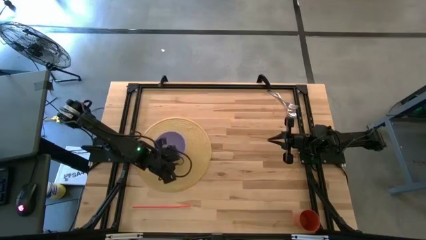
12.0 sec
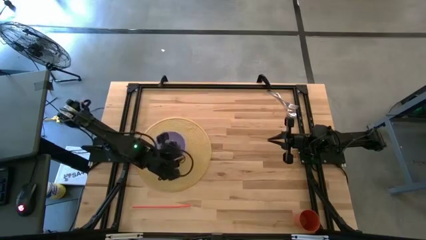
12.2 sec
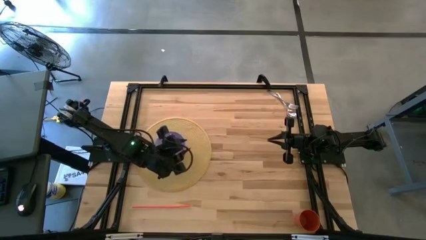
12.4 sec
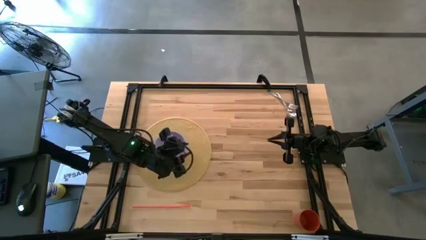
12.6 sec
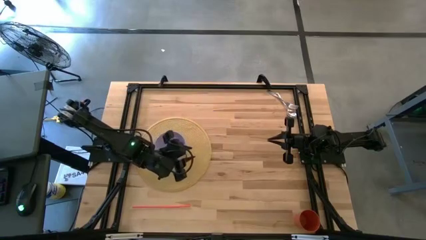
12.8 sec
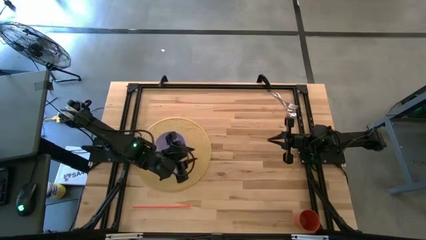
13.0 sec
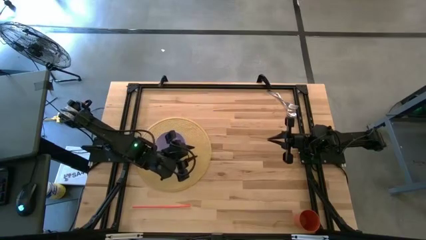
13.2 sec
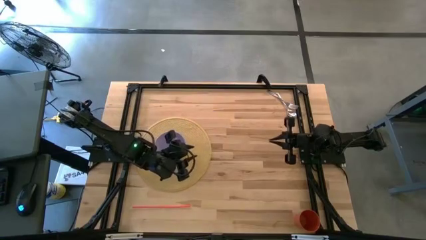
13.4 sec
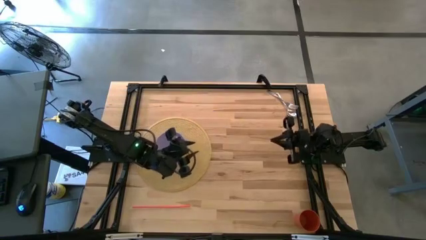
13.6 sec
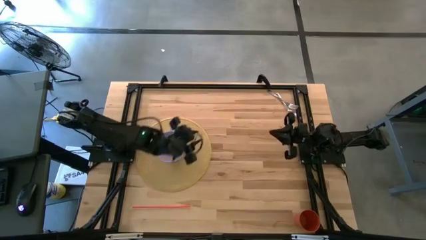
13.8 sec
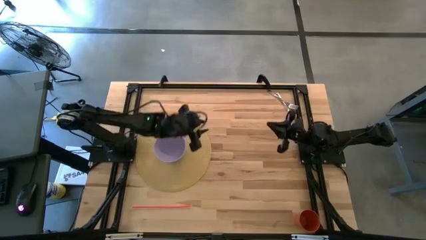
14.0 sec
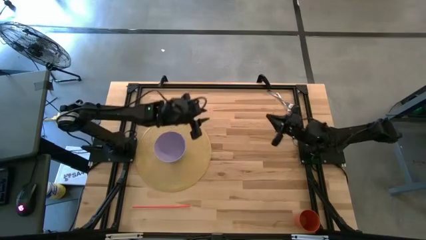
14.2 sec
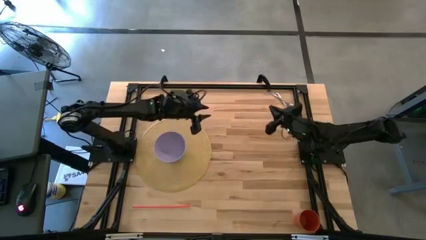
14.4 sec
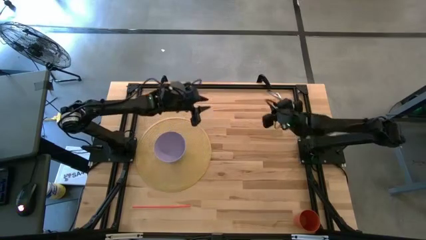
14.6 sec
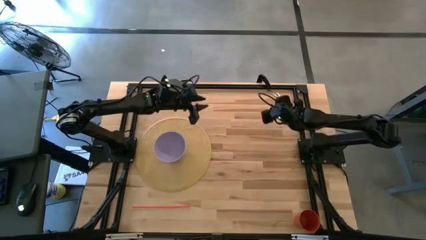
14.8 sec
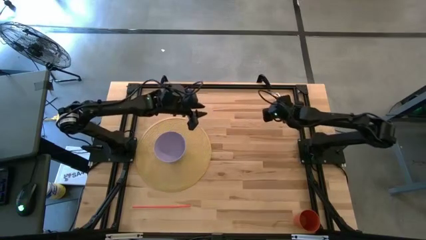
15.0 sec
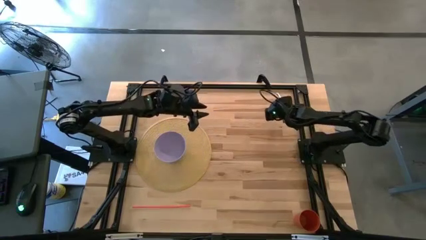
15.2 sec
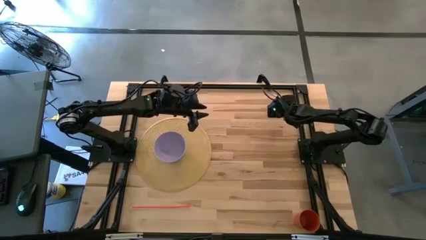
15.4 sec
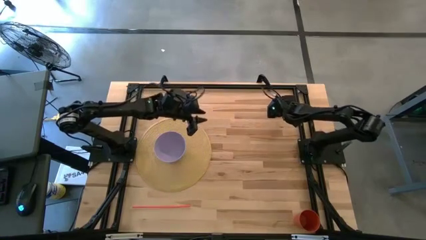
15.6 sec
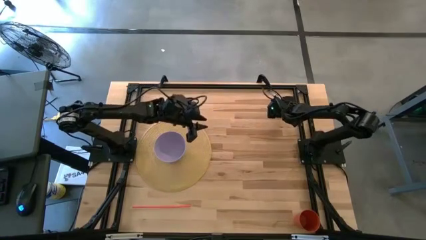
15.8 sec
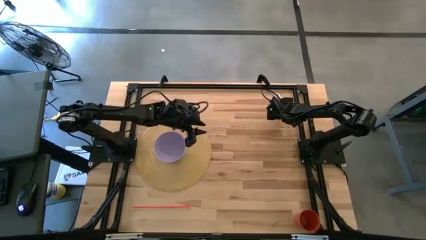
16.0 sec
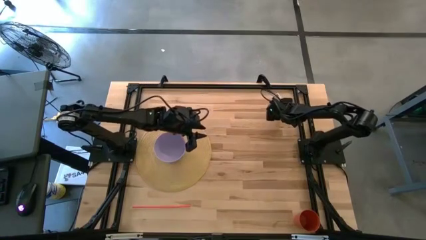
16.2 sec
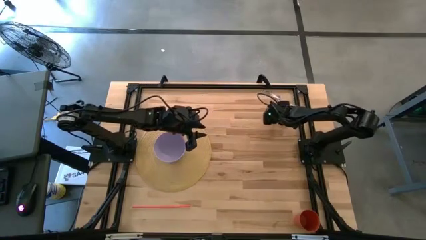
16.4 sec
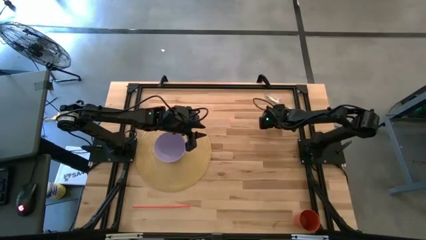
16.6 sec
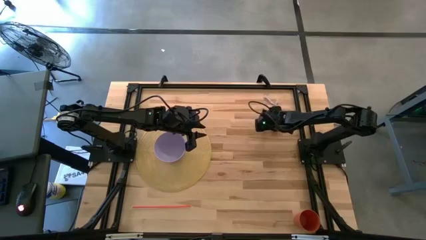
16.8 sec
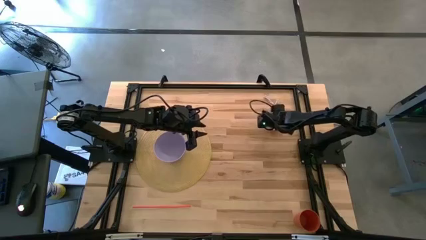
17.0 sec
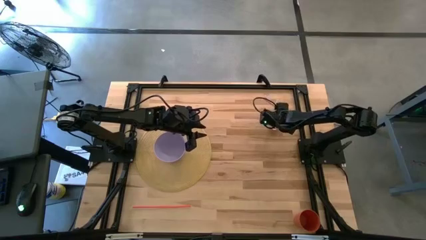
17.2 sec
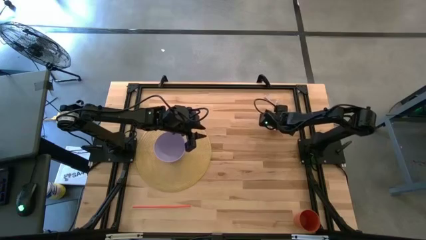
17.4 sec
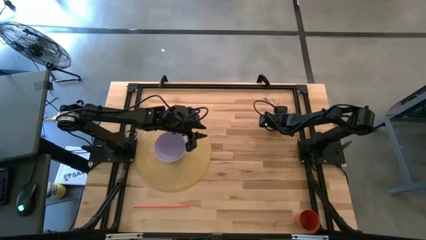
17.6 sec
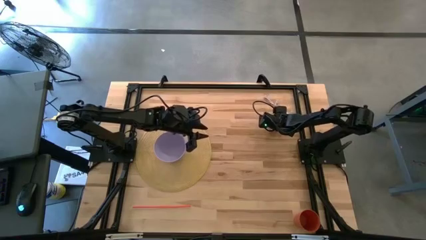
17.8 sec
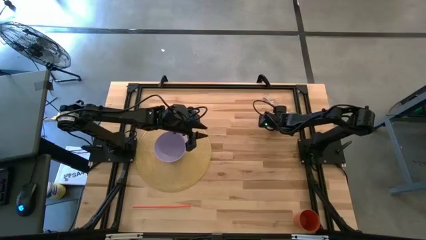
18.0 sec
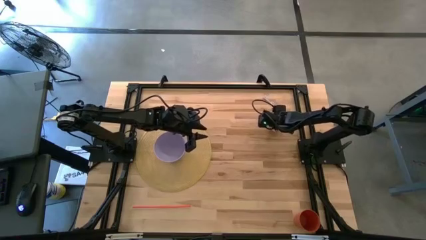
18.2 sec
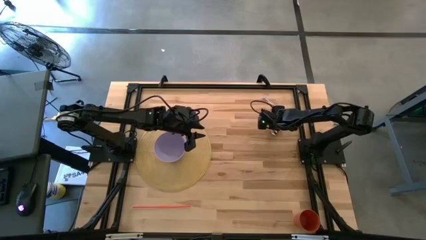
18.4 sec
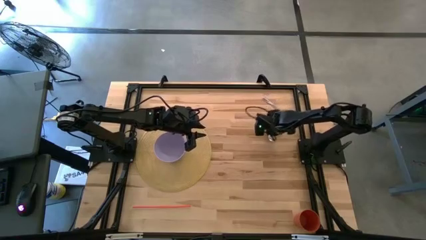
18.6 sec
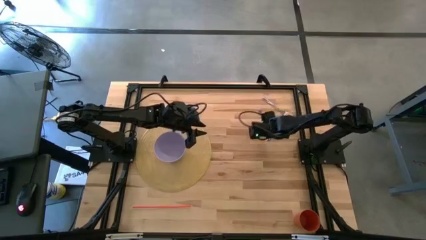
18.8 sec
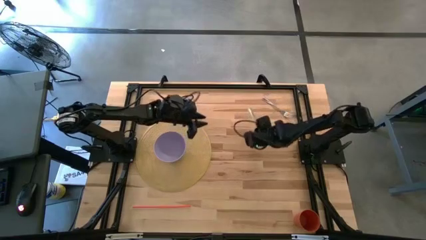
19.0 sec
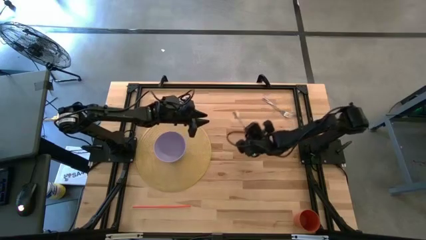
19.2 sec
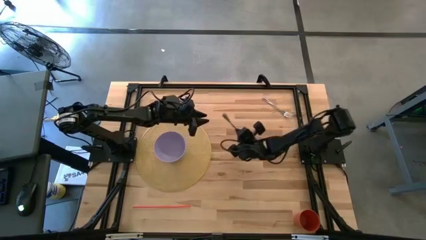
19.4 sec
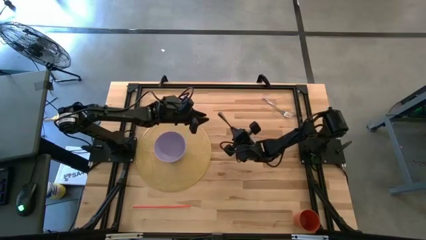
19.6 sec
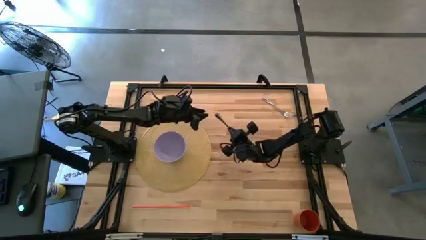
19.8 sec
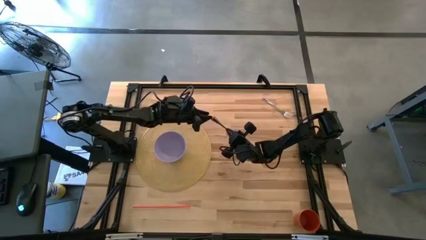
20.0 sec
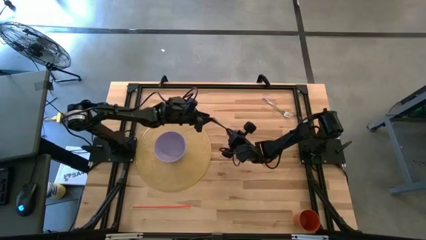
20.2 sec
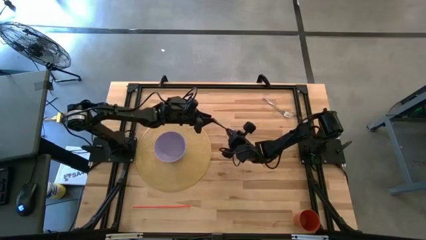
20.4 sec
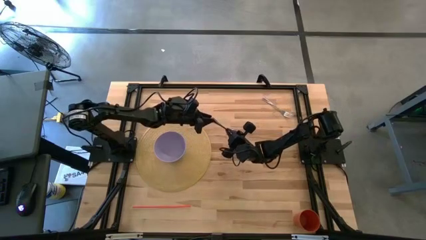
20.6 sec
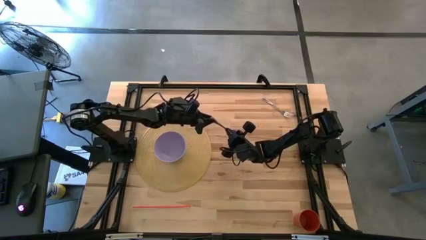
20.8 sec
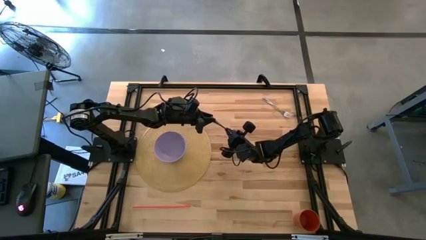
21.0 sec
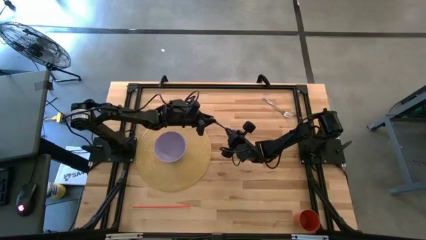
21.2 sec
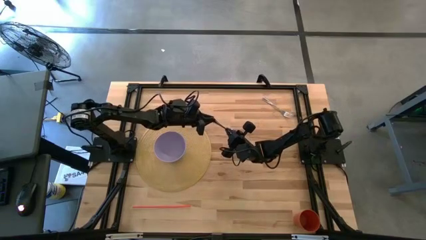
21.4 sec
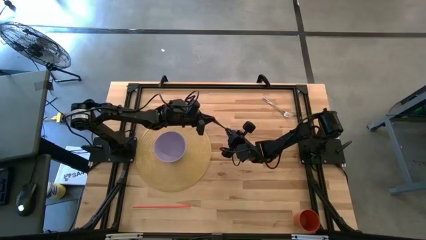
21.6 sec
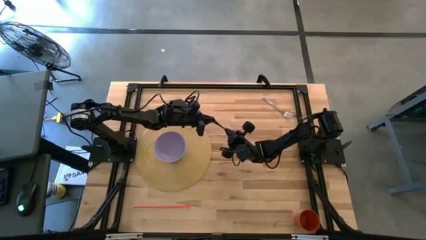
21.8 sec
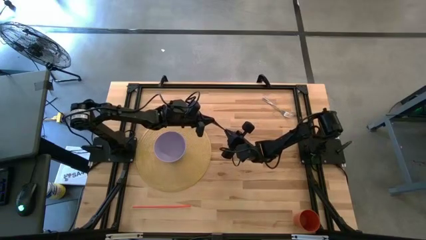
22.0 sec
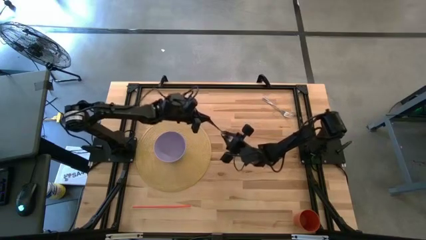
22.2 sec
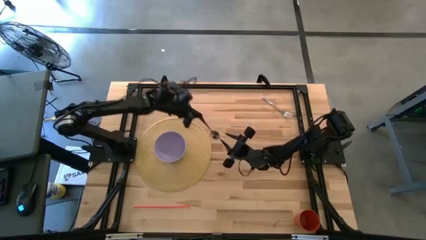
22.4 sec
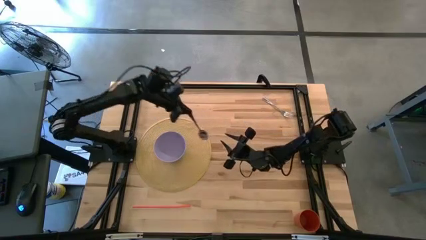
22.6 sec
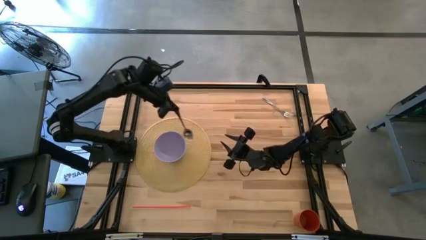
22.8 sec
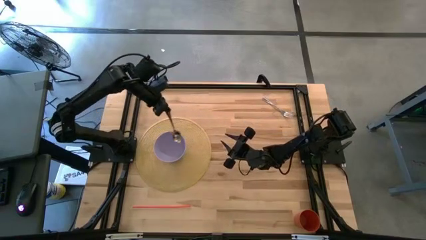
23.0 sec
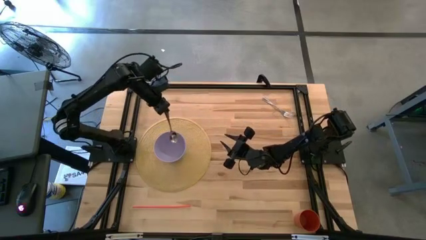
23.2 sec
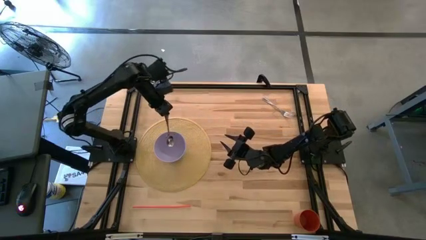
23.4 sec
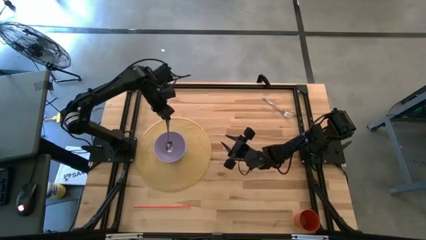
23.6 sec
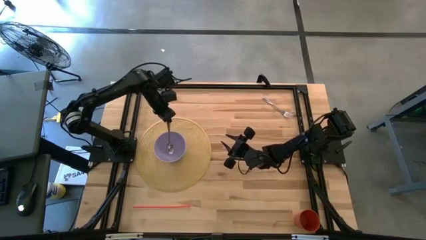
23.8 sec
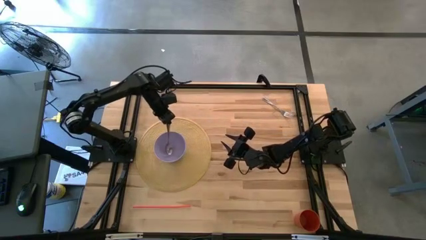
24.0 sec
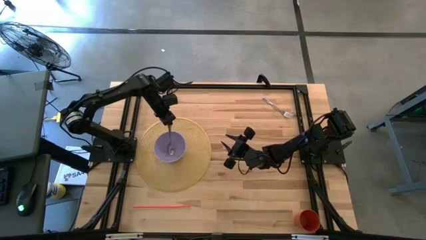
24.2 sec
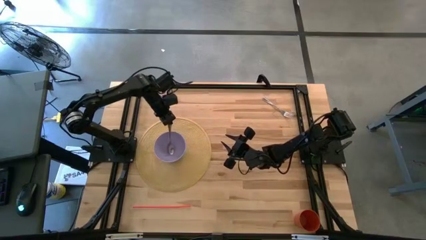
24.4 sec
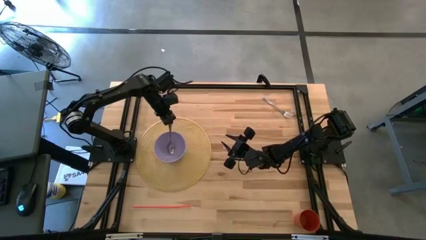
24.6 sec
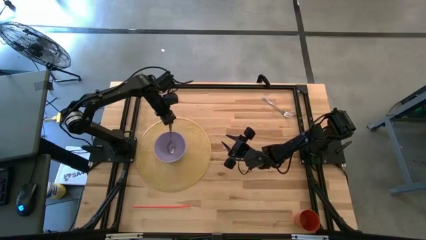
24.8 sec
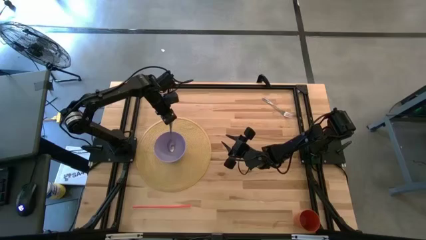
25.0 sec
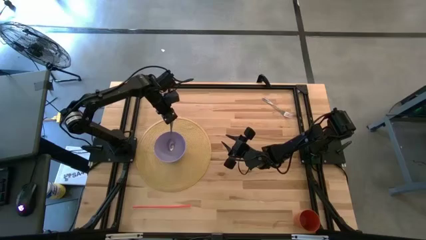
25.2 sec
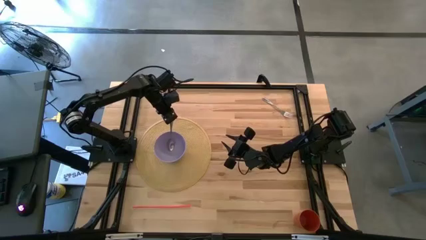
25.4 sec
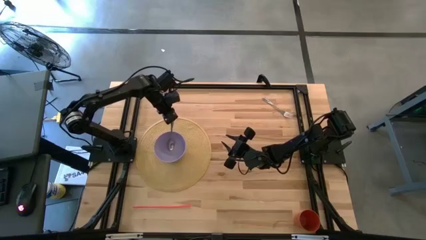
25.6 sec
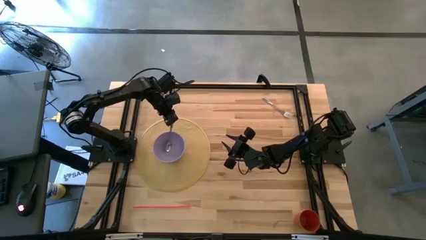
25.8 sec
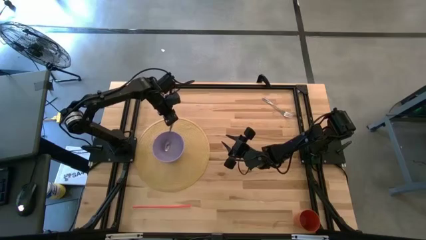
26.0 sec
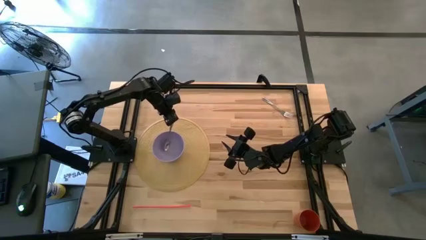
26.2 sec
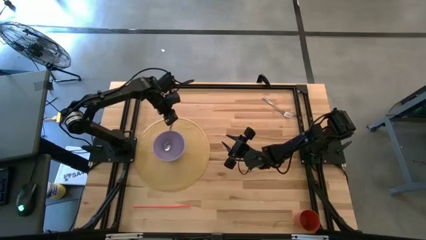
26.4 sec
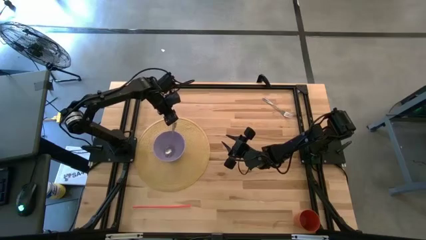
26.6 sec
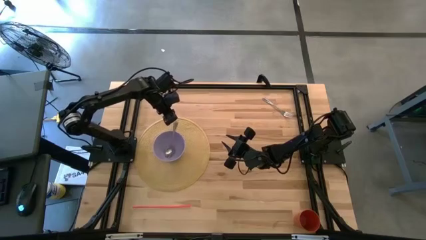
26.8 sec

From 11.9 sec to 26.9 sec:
Task: Pick & Place Utensil
Put the silver spoon into the purple bowl

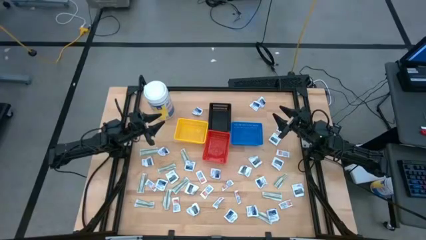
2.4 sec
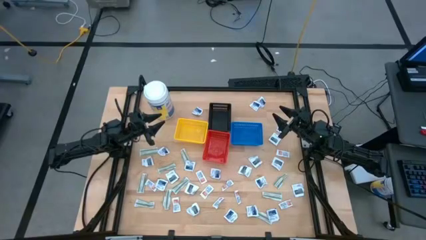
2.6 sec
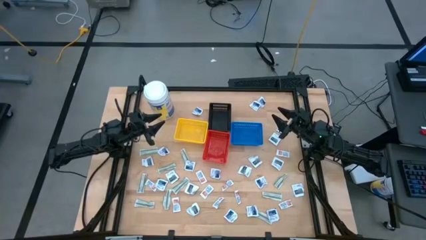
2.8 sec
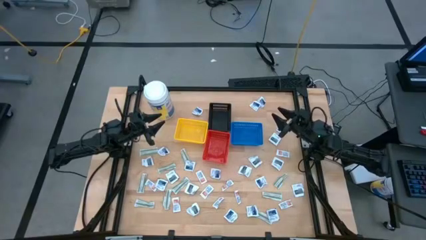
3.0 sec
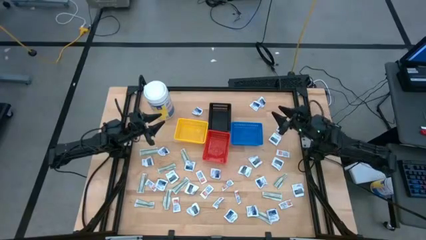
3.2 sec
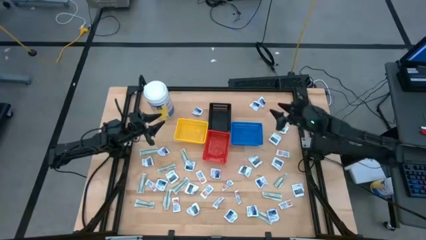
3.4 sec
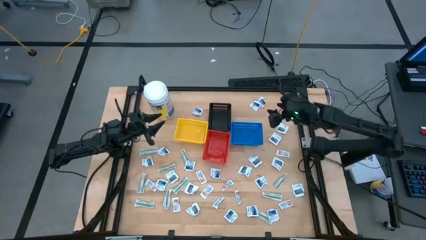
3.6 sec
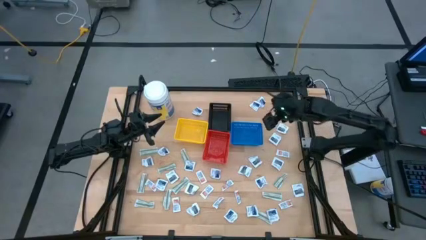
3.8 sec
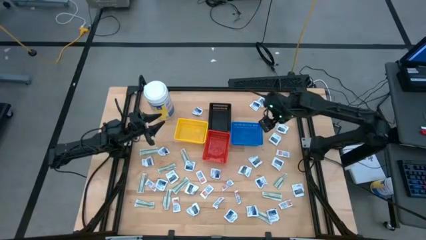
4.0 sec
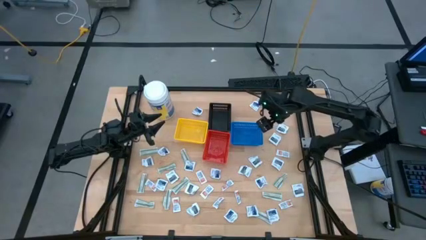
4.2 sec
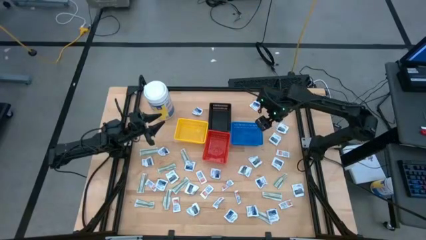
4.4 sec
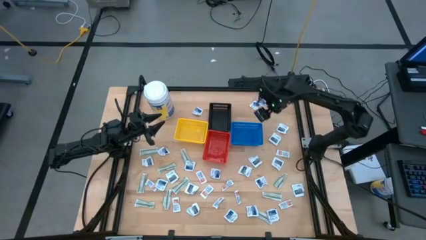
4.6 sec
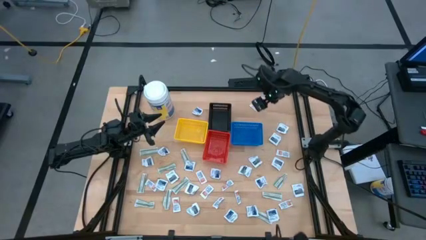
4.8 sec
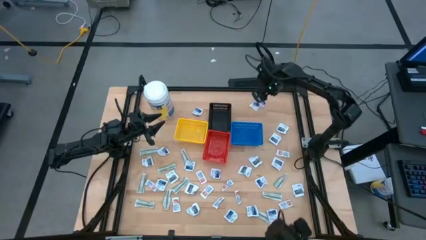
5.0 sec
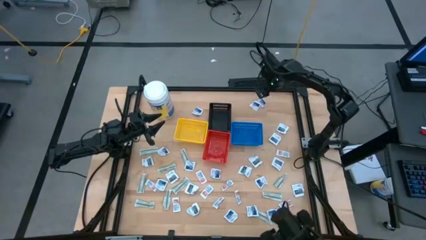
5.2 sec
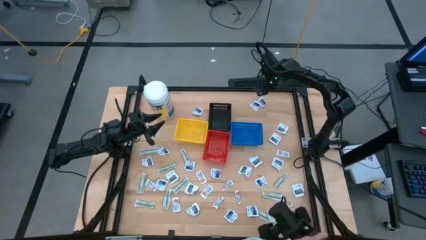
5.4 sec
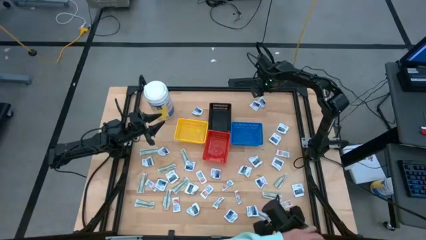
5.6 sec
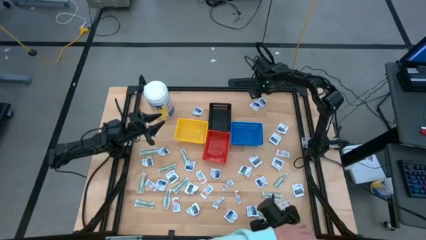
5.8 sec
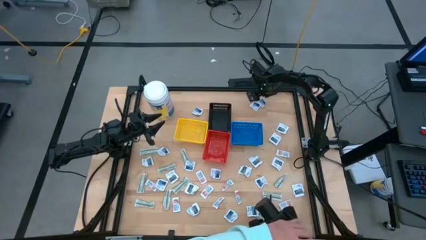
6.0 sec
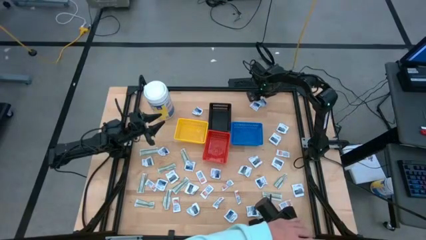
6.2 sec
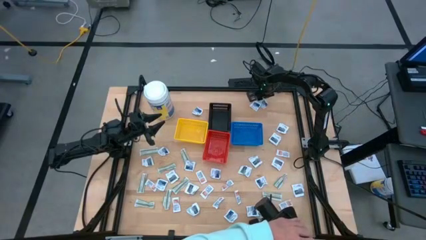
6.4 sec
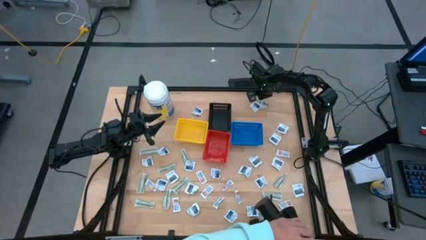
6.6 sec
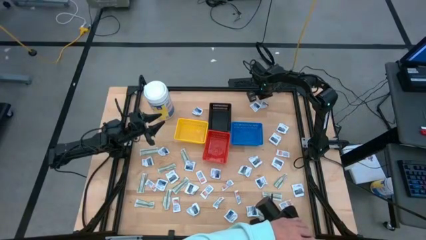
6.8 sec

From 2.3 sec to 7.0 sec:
Task: Pick & Place First Aid Supplies
Put the alcohol pad into the blue bin
